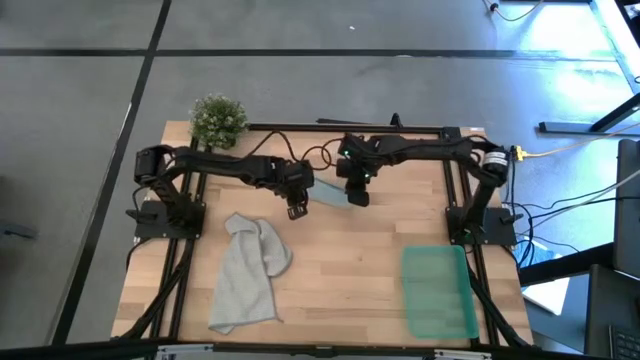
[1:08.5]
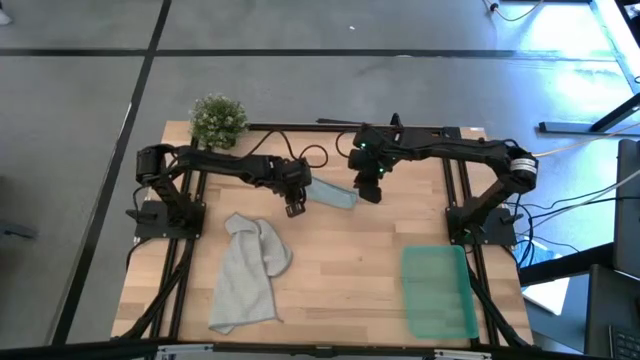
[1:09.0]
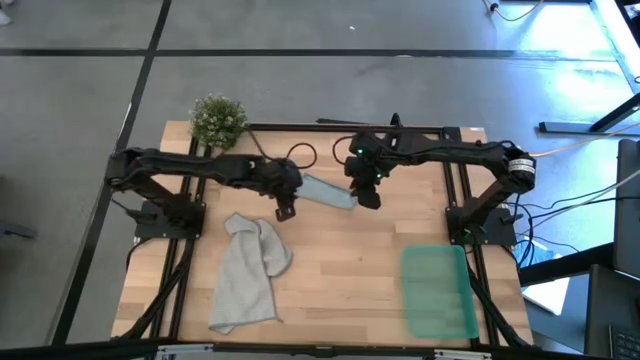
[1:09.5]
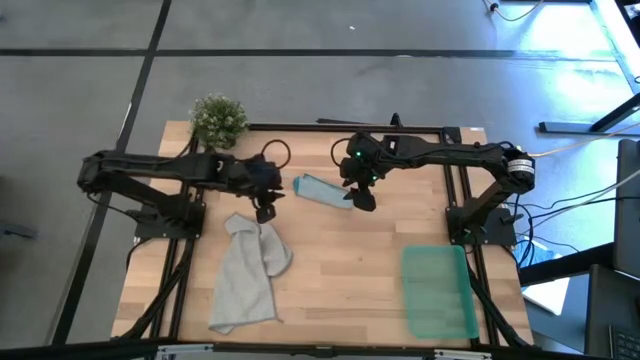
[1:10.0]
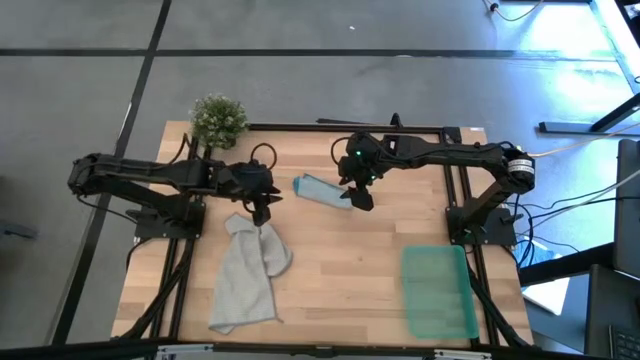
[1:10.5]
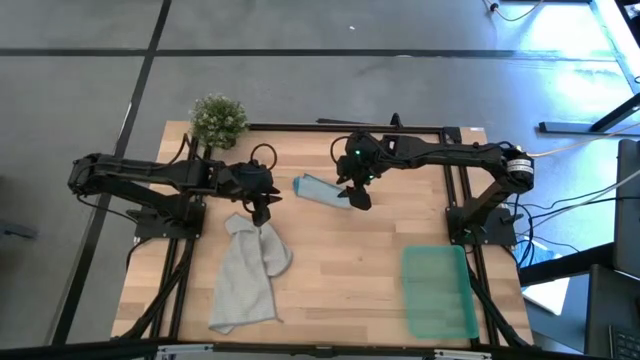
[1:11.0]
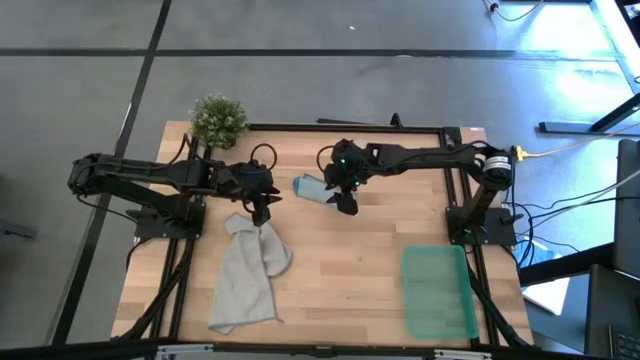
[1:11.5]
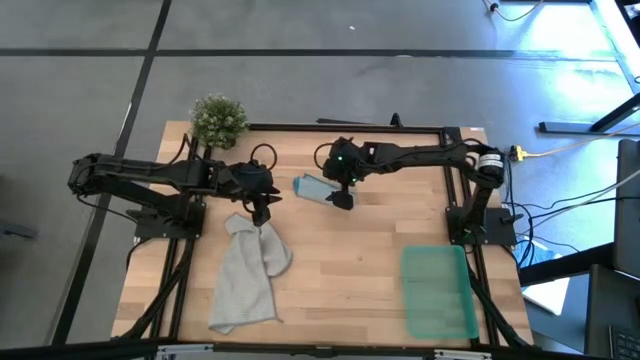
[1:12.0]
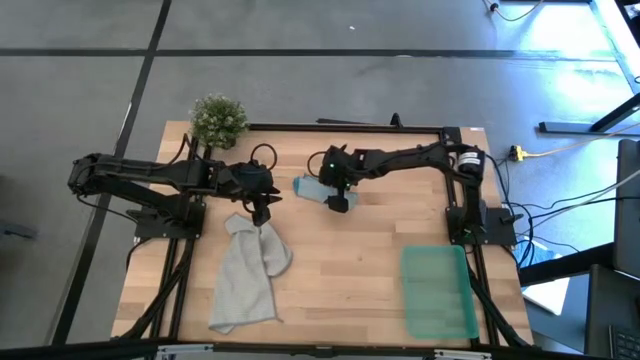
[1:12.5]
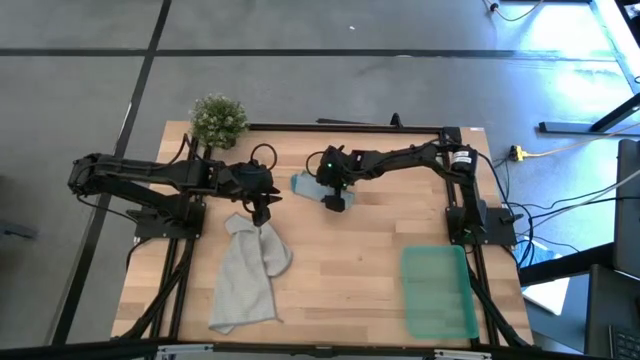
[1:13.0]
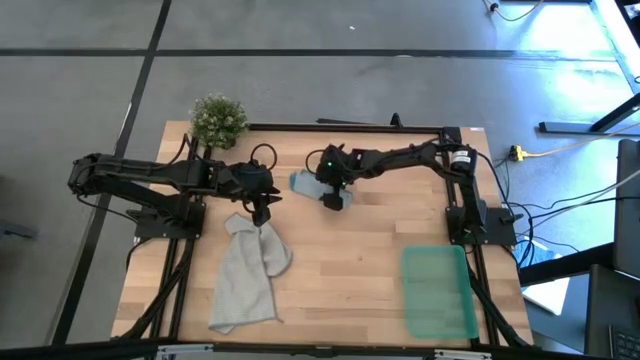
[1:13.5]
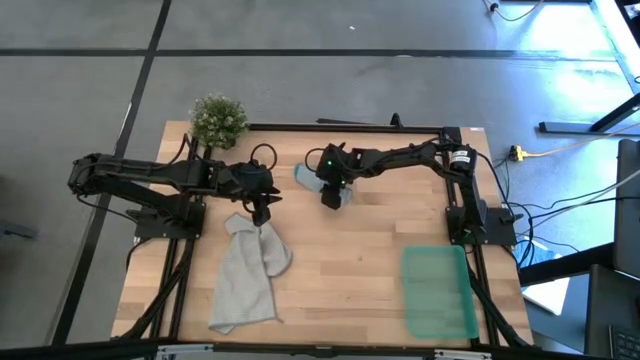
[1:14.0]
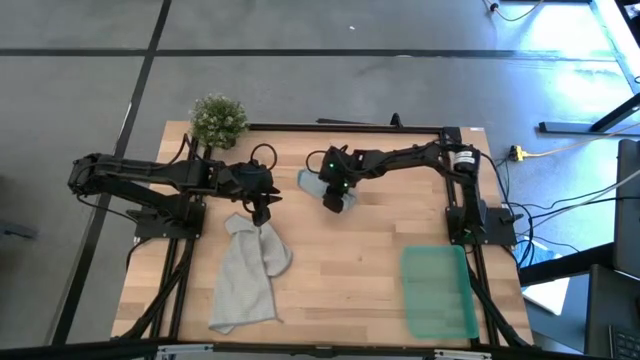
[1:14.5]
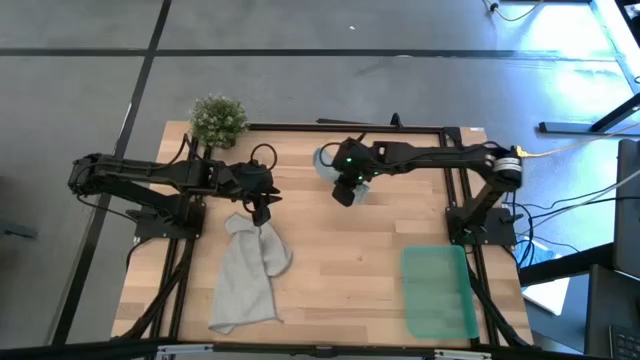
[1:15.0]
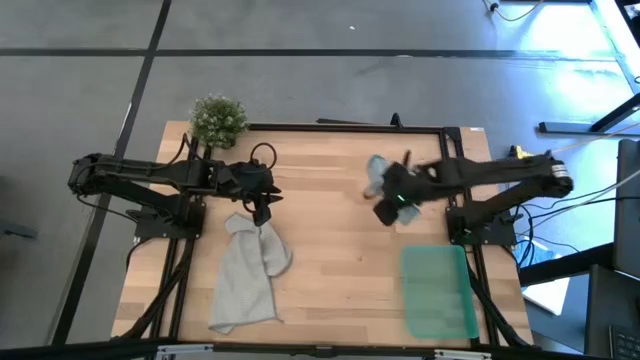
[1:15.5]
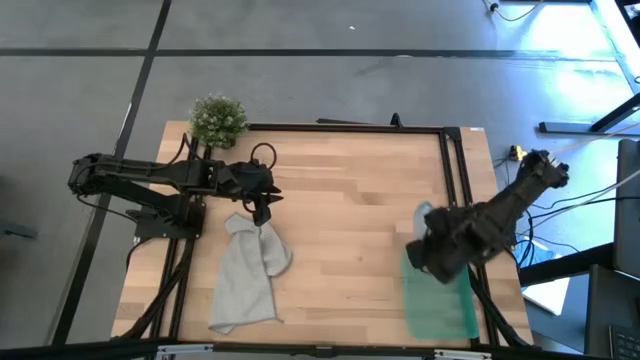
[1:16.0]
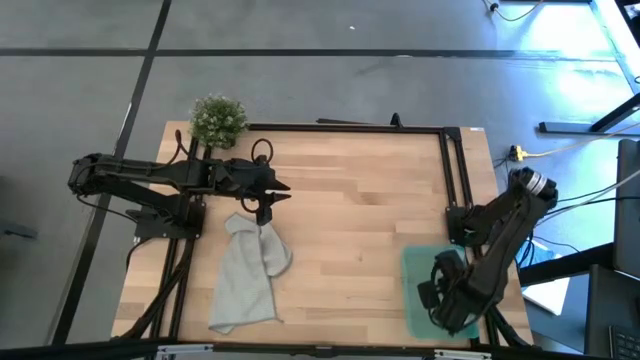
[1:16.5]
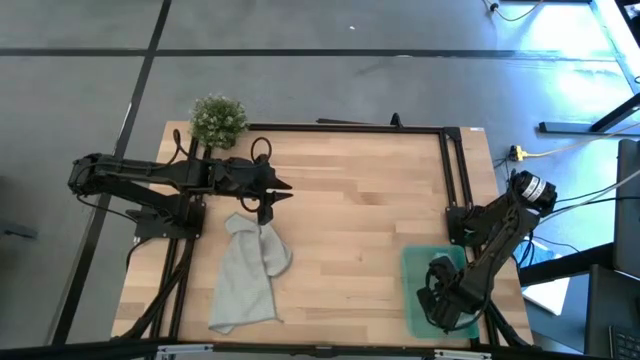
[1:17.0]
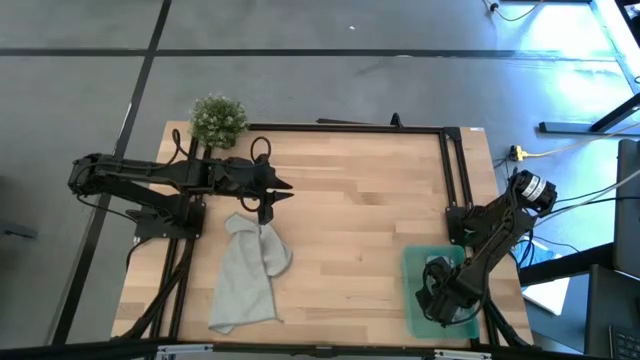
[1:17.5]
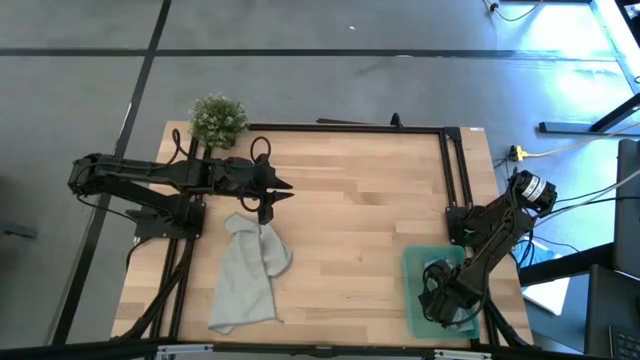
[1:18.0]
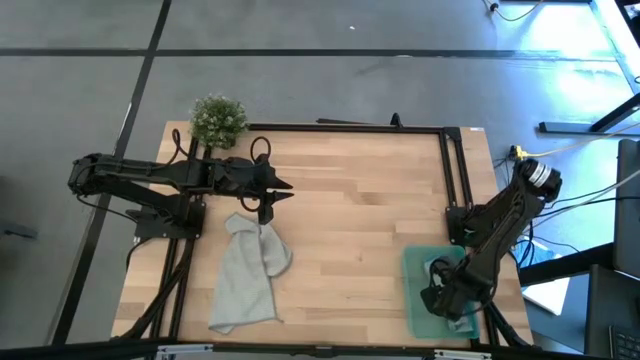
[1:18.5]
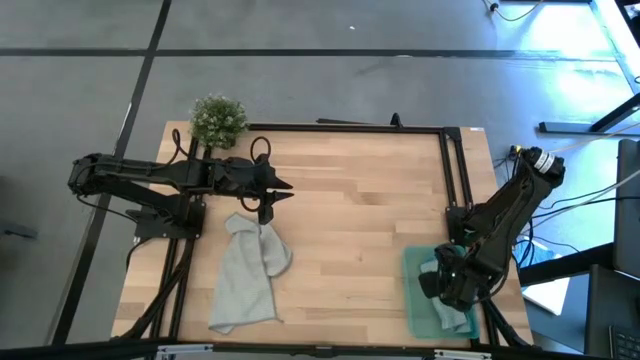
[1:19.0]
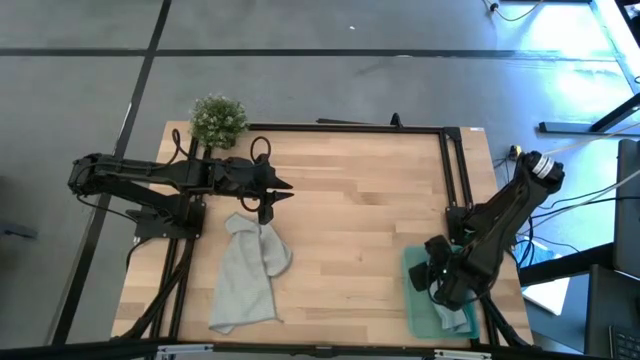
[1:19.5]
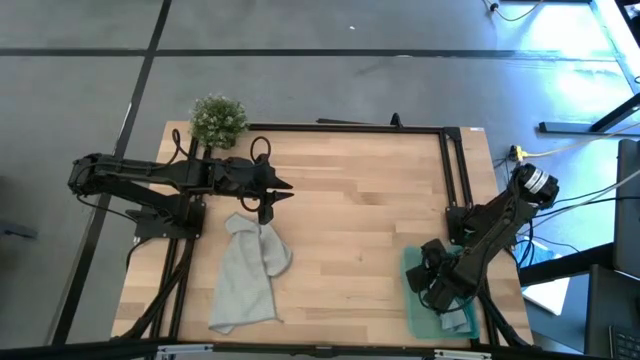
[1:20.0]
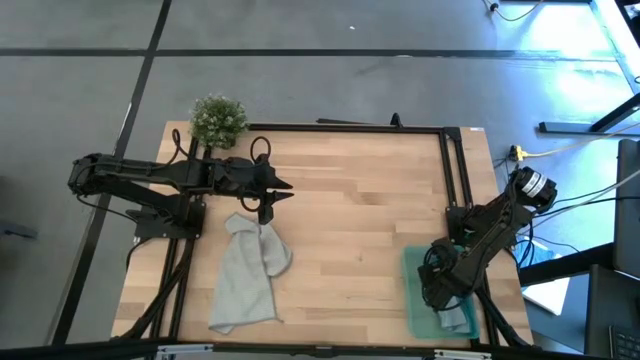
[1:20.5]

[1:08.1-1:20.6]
Task: Roll microfiber towels into tight, uniform cylinder then place into a basket
Put the rolled blue towel into the green bin

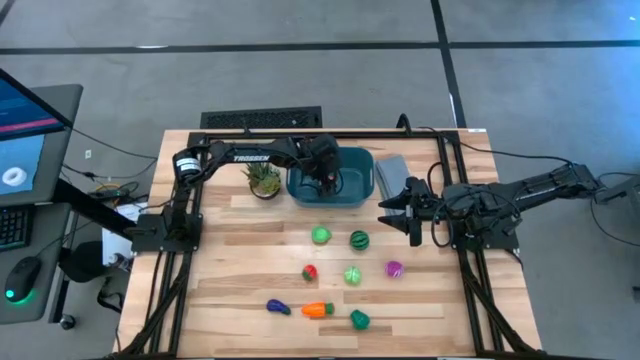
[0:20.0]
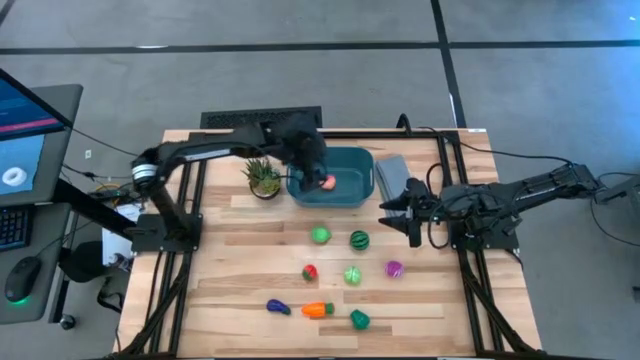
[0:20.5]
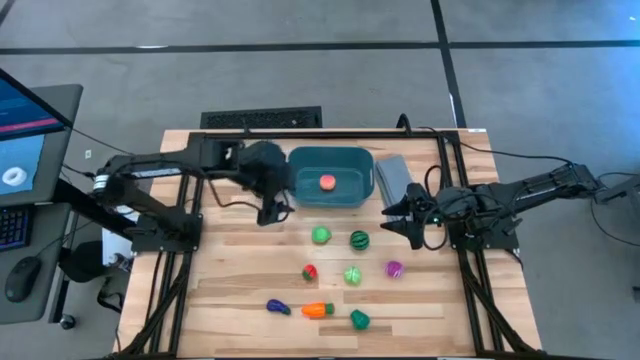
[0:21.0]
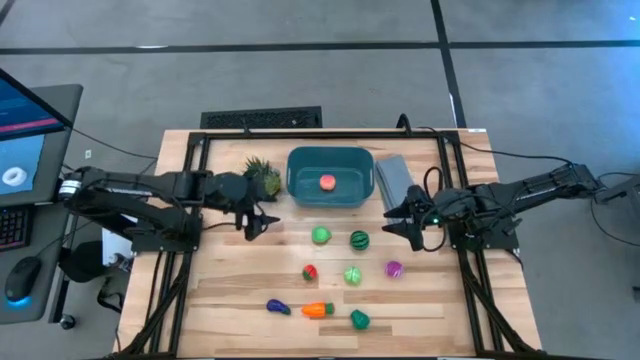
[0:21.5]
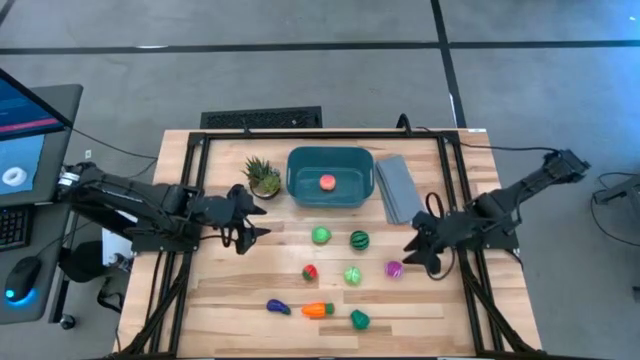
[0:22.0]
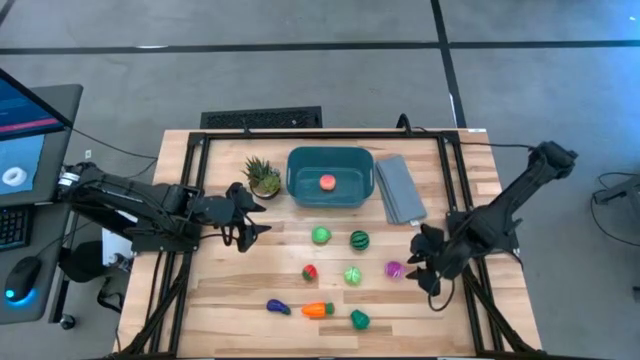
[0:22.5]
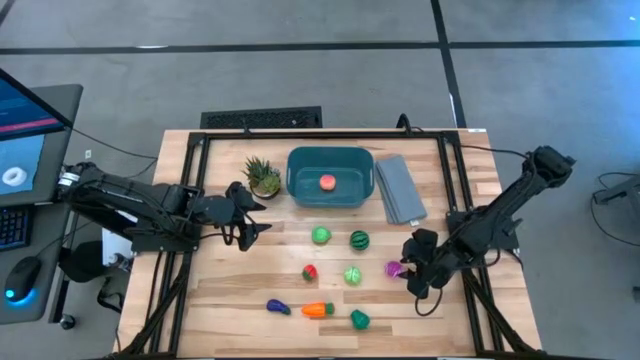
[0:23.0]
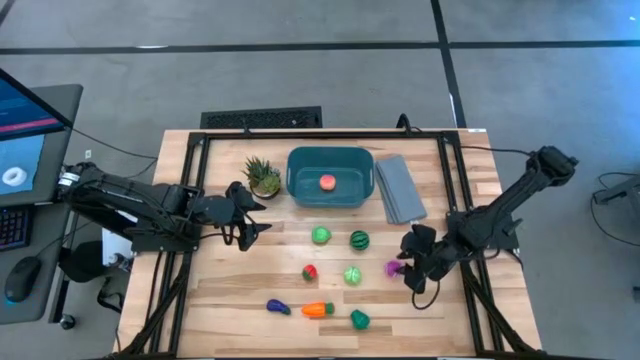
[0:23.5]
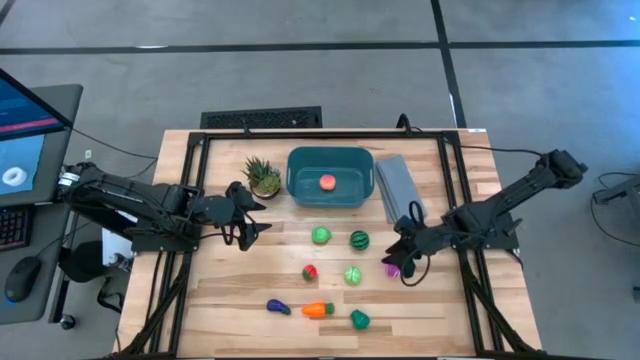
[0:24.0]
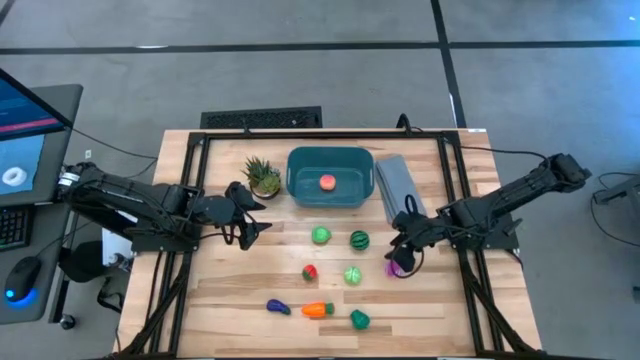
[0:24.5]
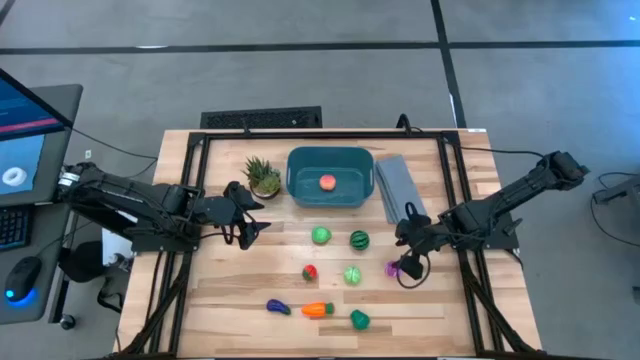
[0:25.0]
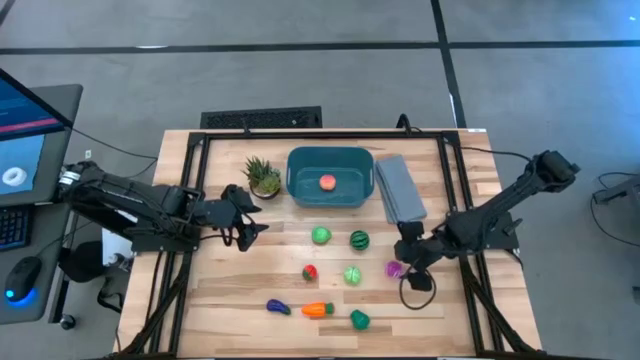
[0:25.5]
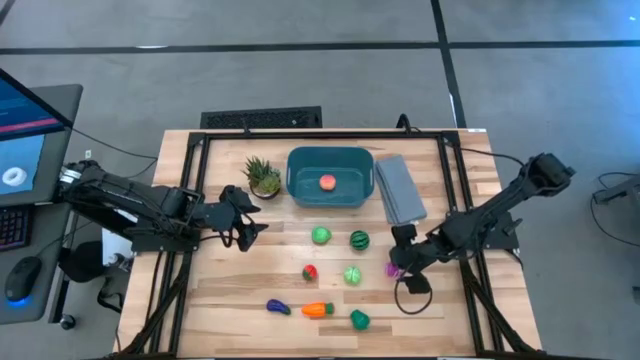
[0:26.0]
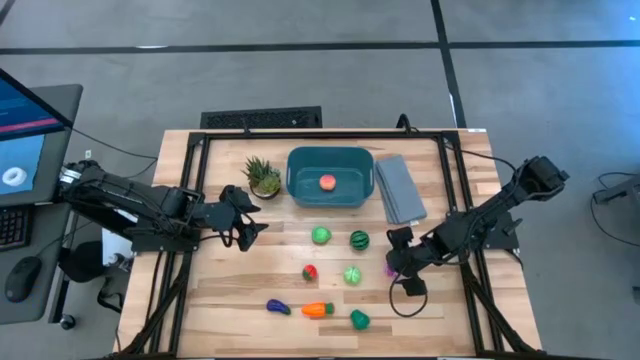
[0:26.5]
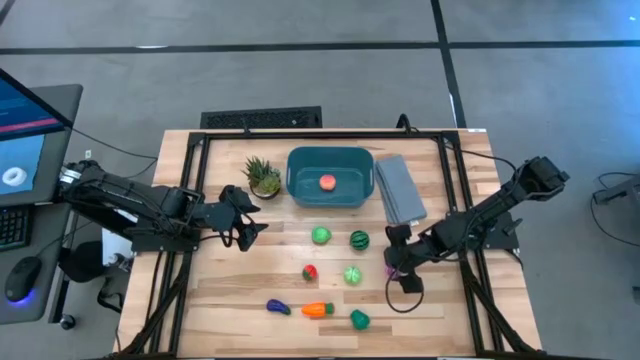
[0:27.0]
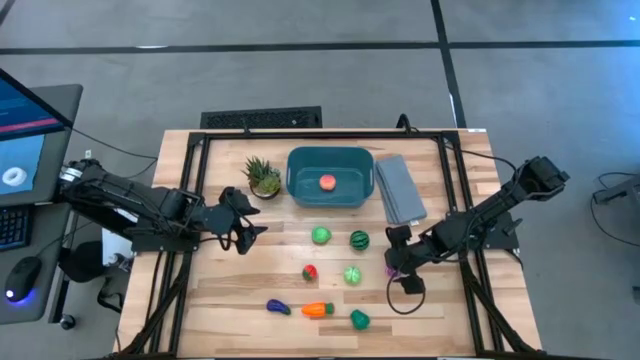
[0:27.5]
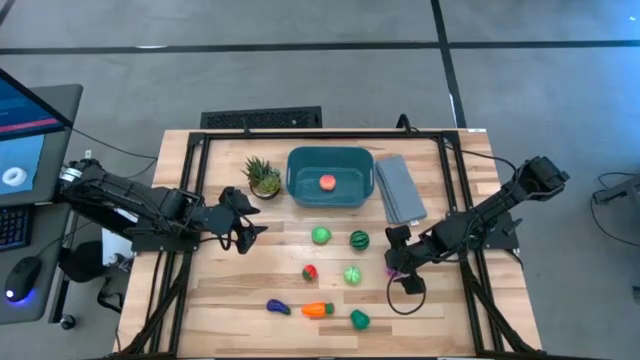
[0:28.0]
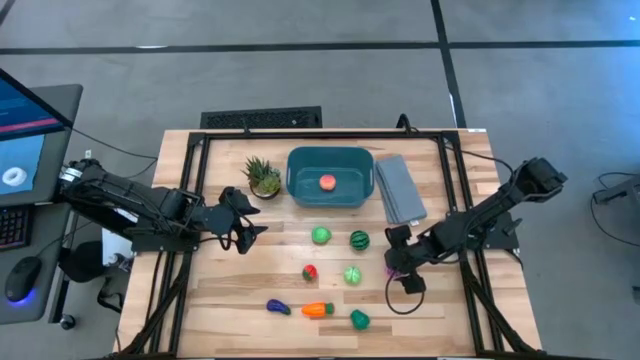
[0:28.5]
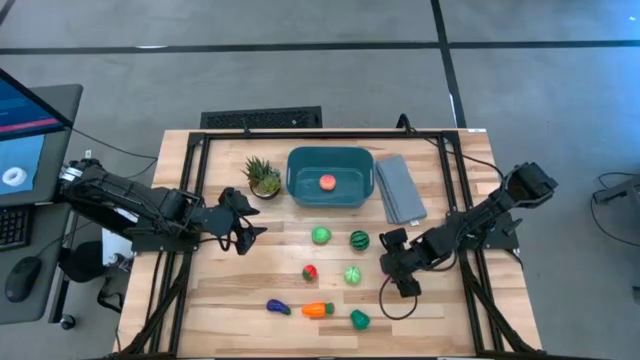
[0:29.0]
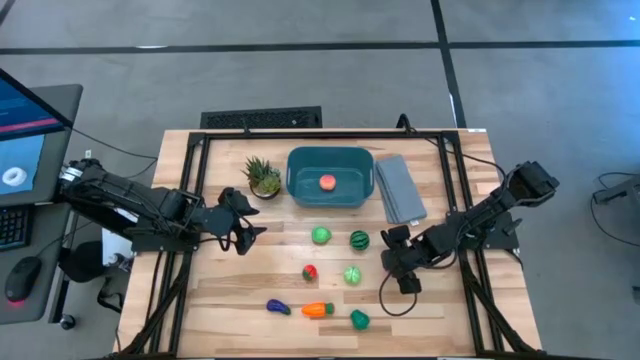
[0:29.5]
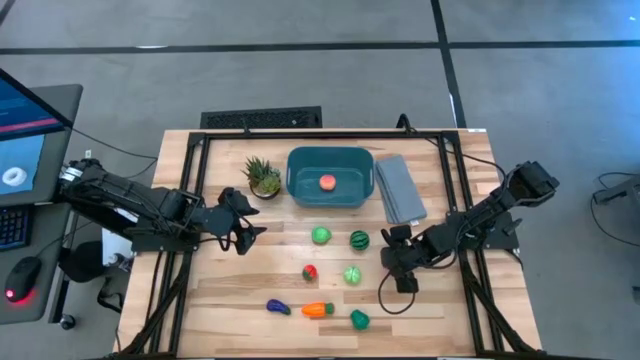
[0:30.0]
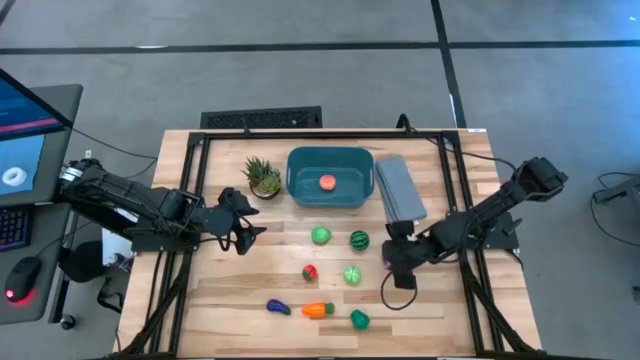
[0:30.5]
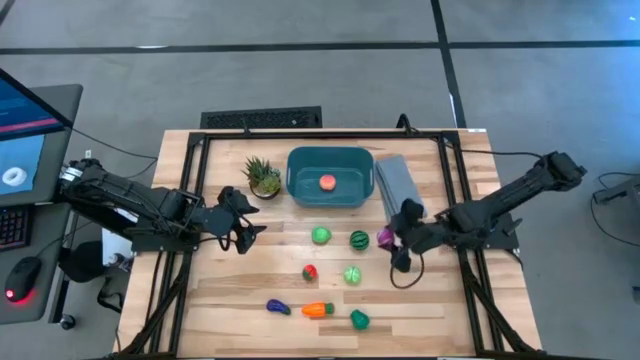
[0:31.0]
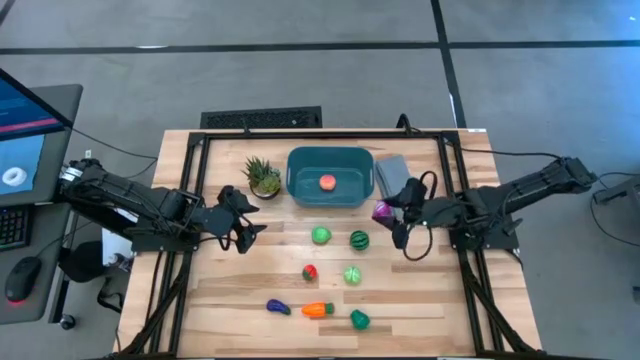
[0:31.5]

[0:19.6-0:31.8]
Task: Pick and placing Produce into tupperware
Put the onion into the blue bin
